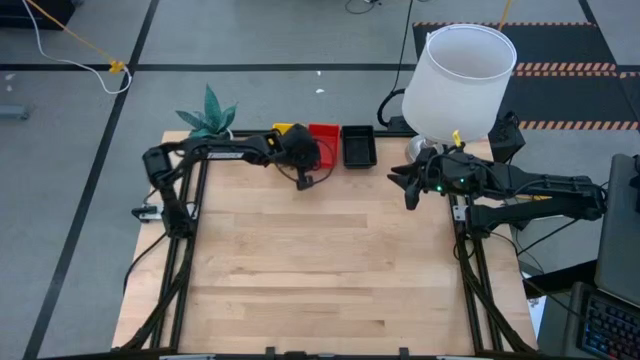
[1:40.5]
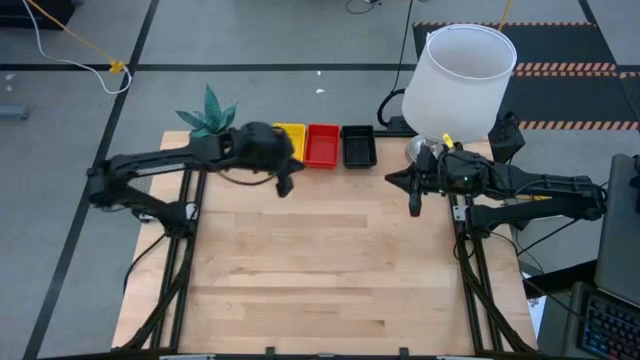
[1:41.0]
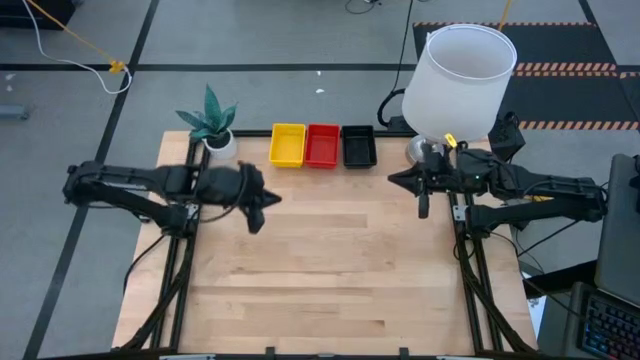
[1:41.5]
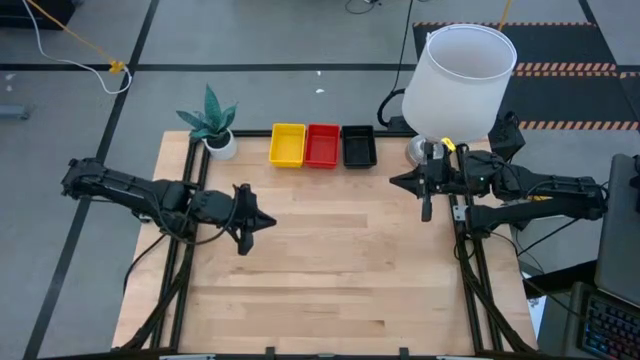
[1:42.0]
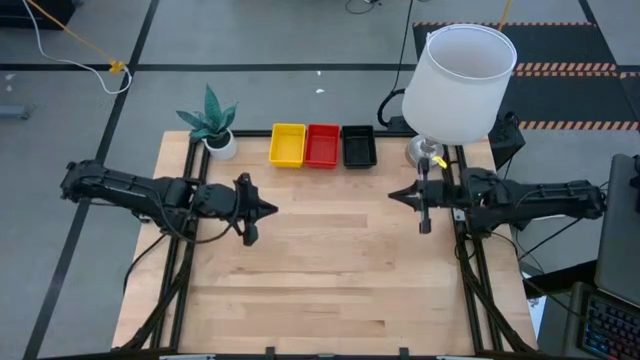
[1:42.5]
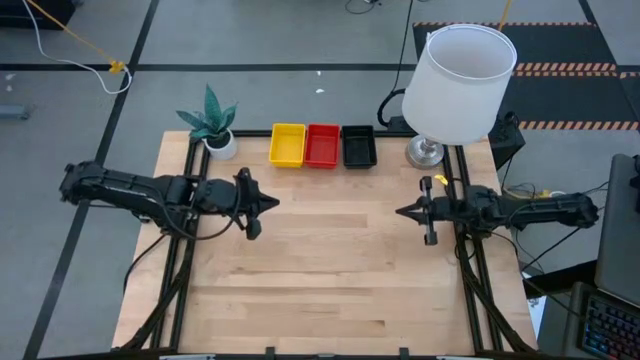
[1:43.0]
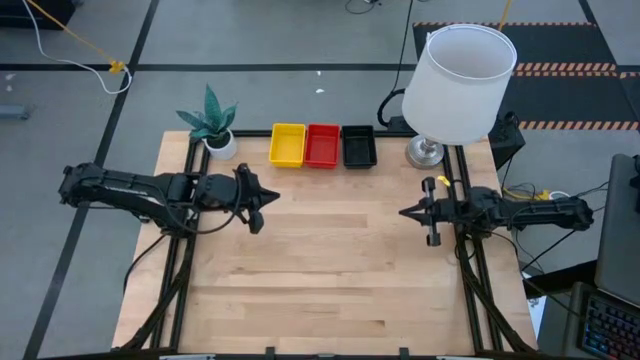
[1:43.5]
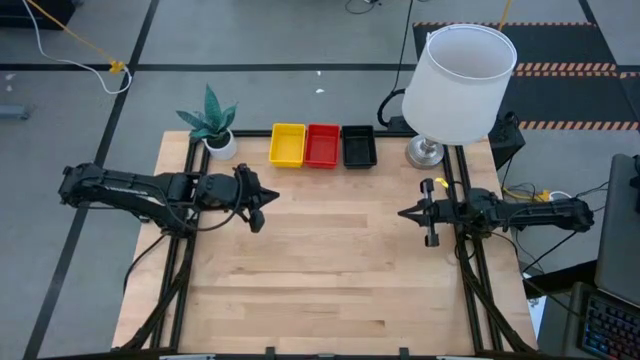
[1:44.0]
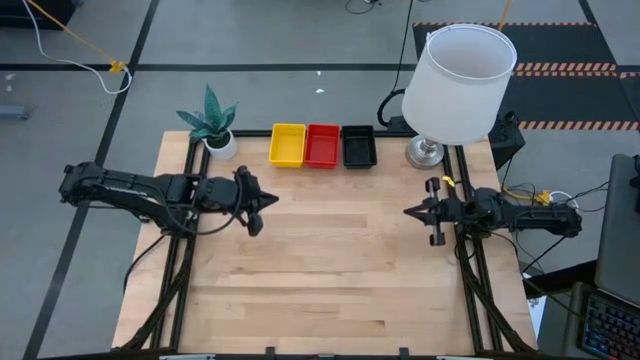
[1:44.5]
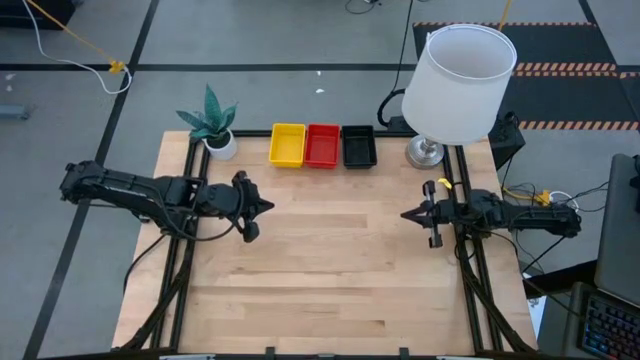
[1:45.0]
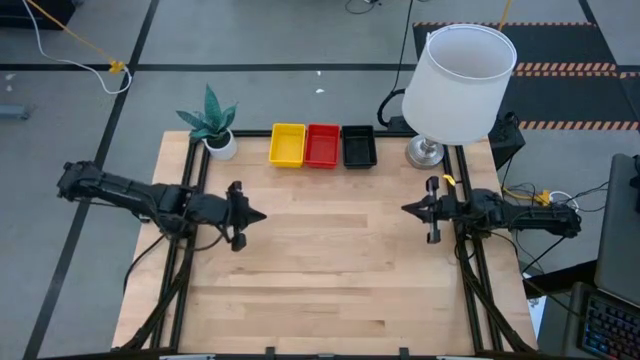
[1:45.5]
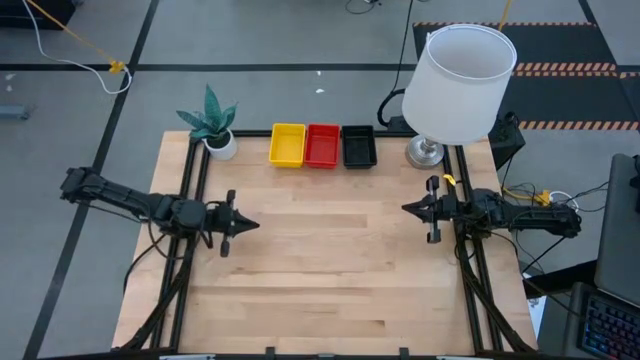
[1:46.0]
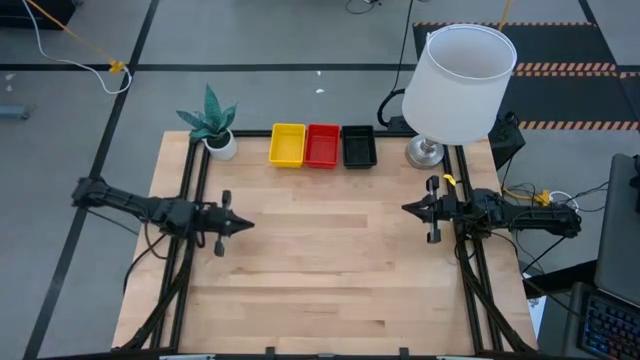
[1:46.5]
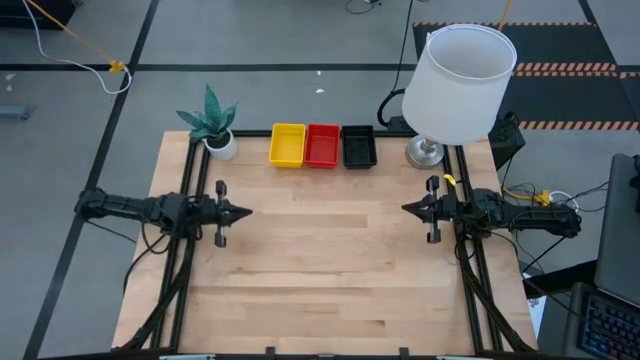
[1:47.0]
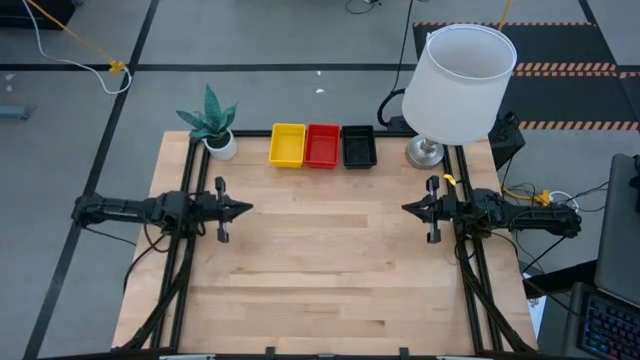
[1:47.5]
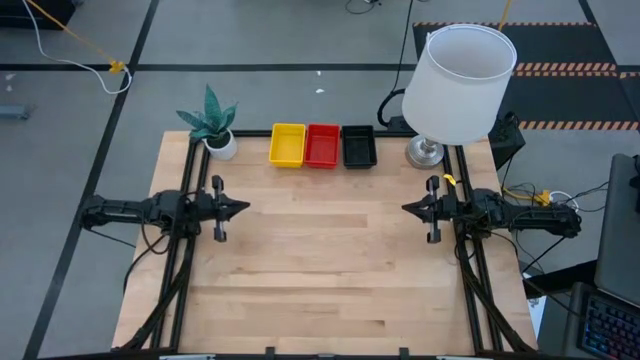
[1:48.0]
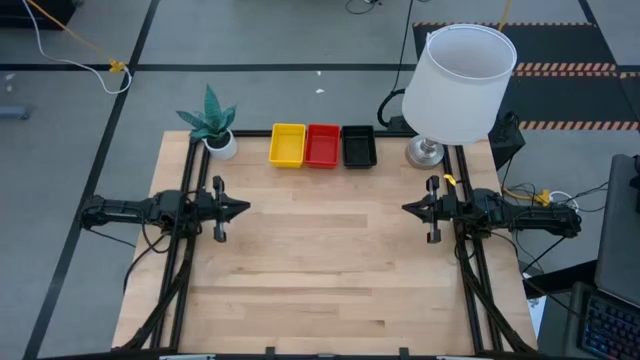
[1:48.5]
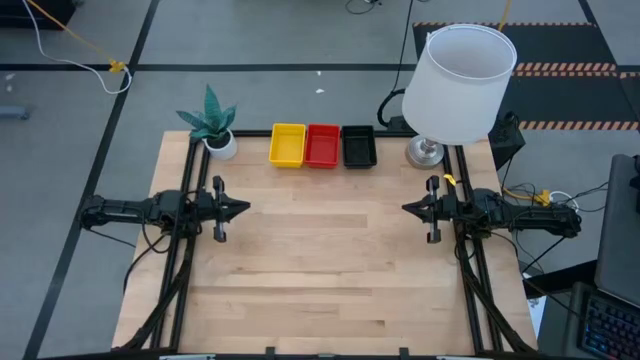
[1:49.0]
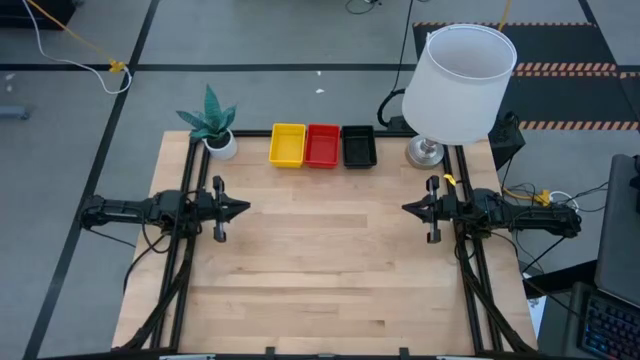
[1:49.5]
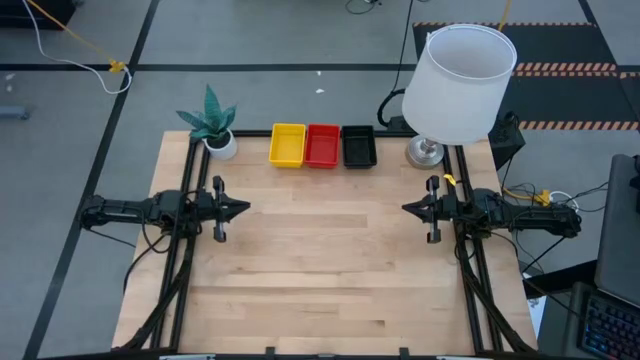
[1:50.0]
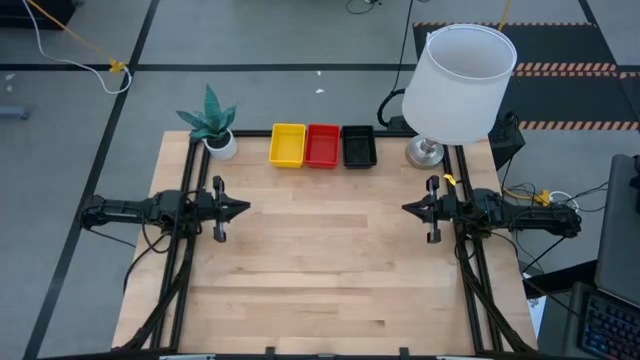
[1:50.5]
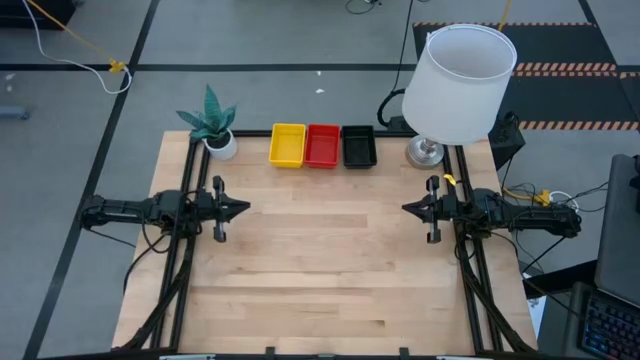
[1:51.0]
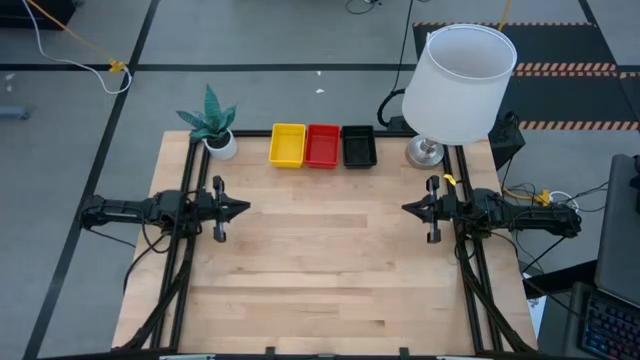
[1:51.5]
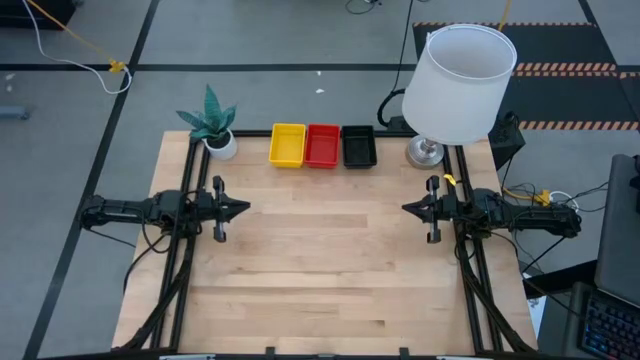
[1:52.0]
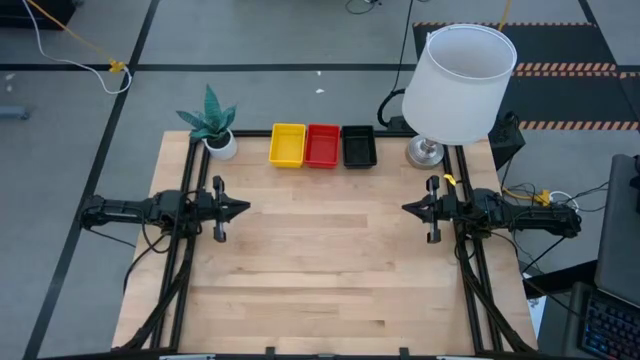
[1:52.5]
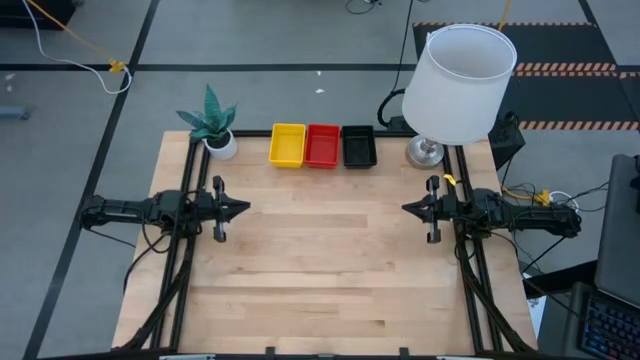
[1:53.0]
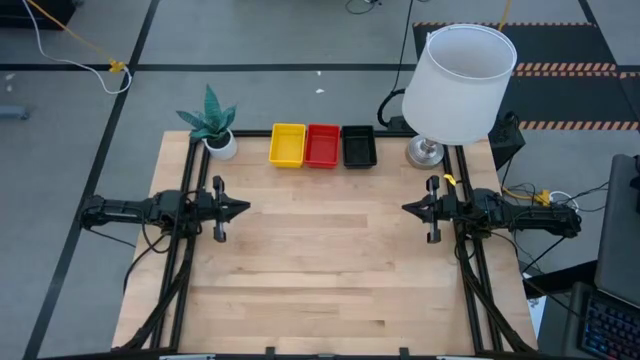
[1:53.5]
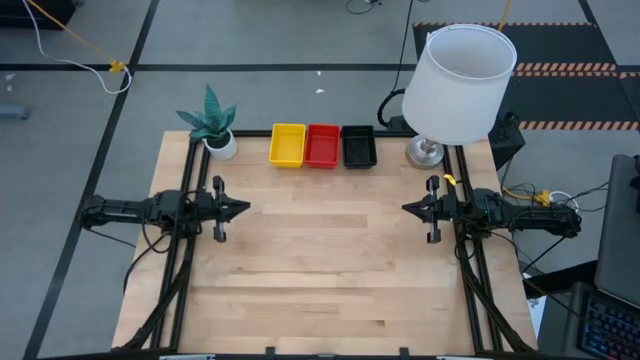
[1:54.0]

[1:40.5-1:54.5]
Return to Home Position
